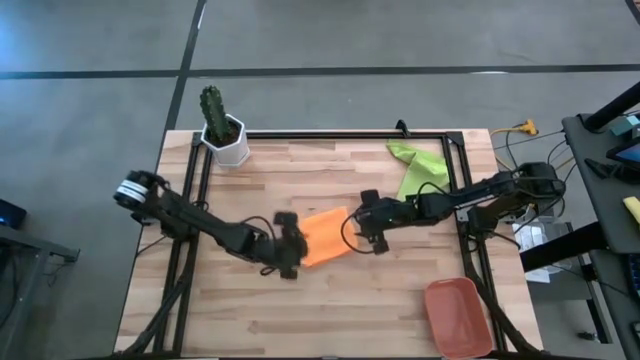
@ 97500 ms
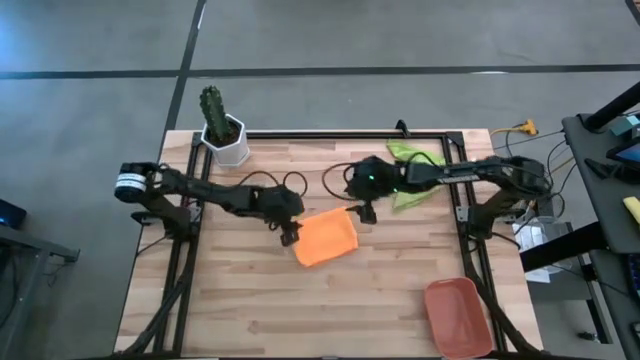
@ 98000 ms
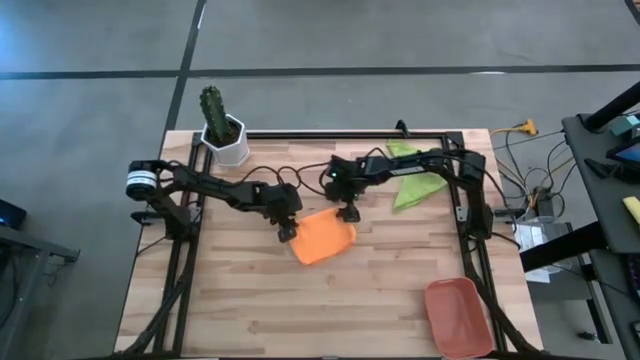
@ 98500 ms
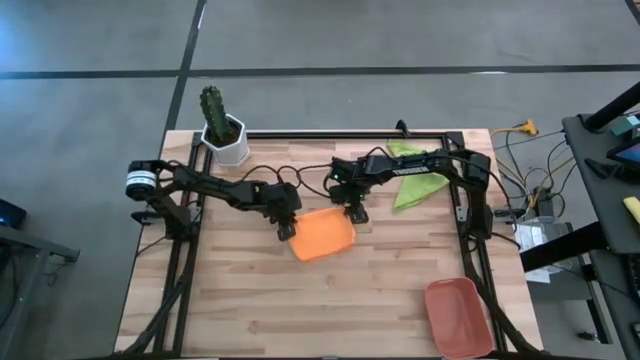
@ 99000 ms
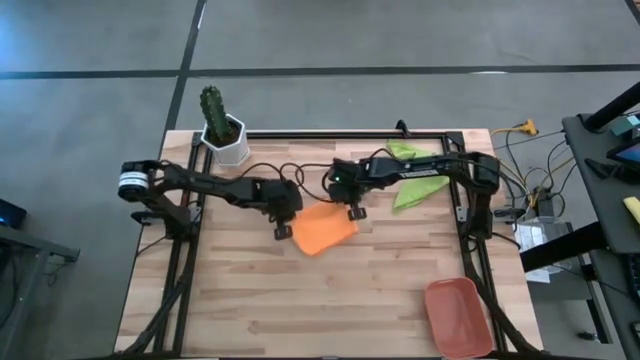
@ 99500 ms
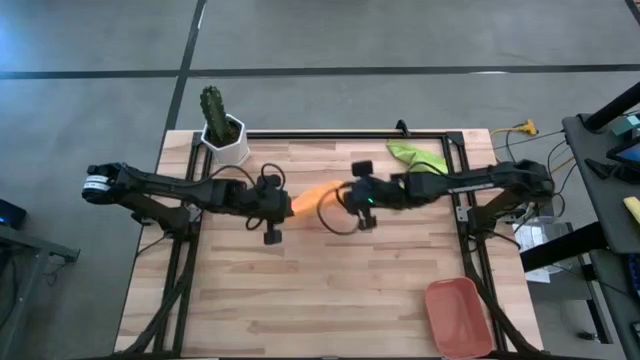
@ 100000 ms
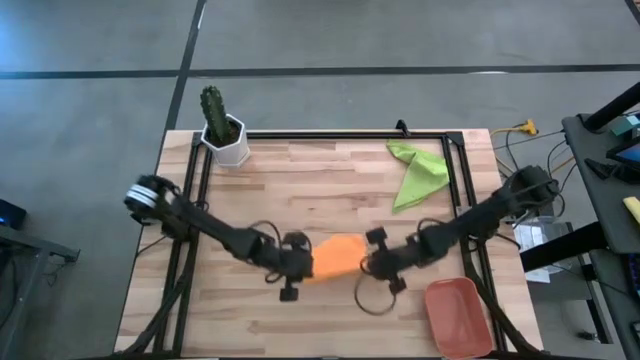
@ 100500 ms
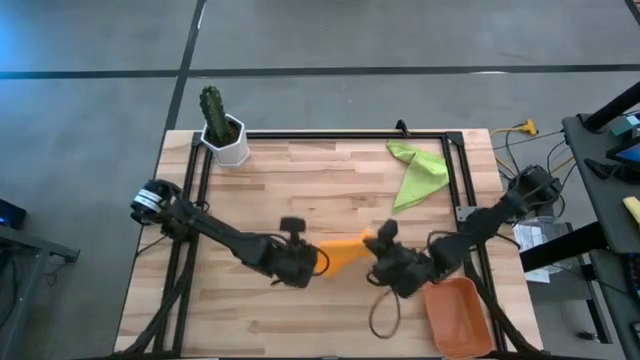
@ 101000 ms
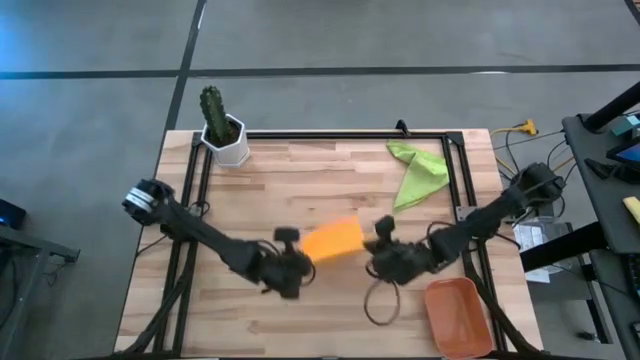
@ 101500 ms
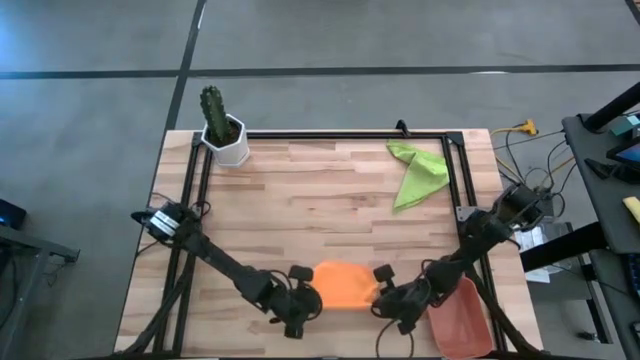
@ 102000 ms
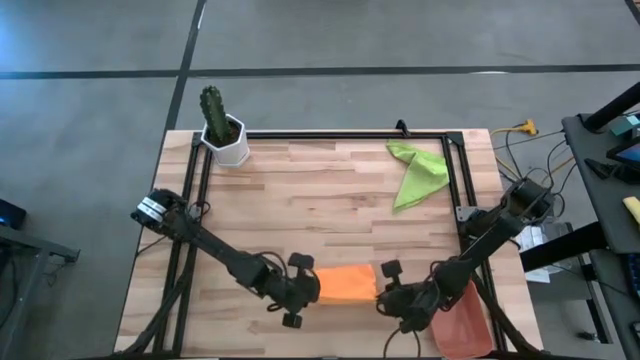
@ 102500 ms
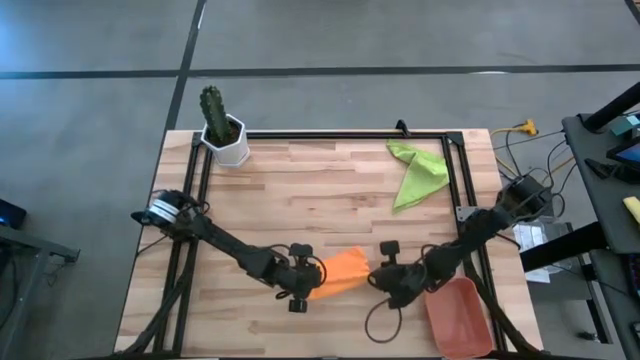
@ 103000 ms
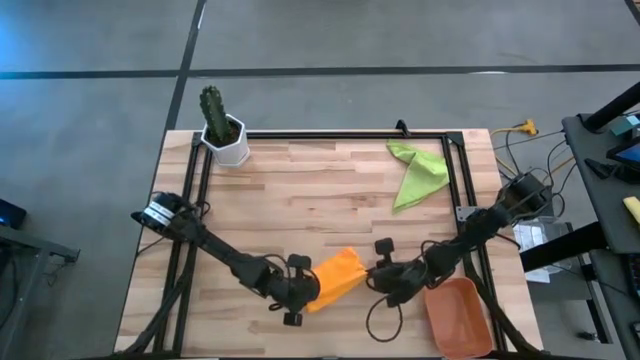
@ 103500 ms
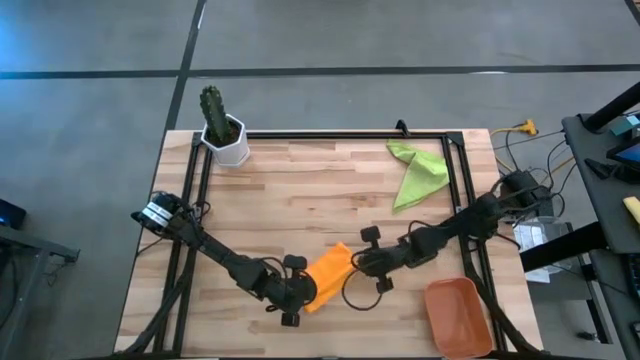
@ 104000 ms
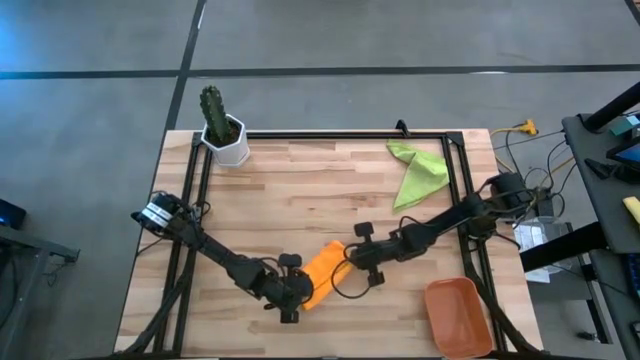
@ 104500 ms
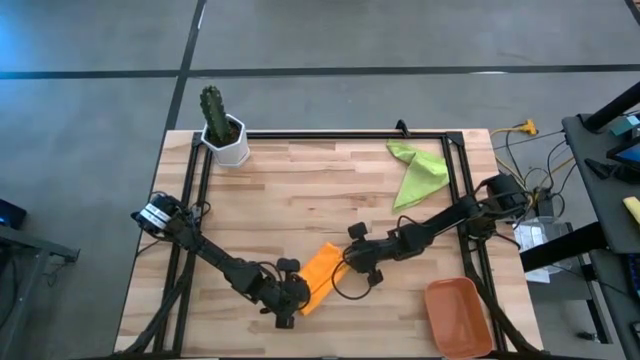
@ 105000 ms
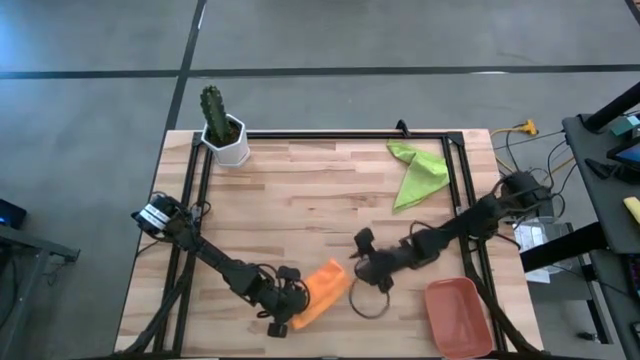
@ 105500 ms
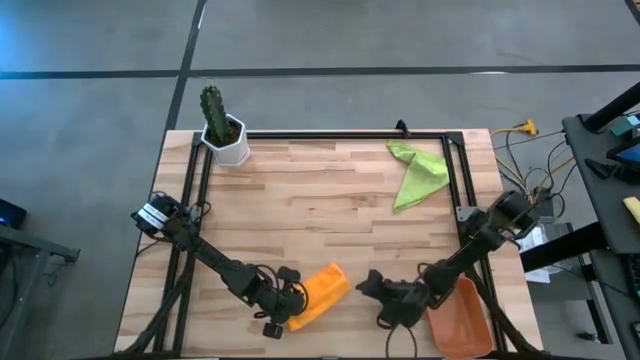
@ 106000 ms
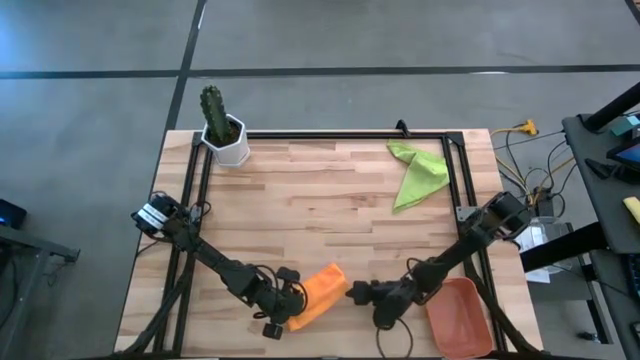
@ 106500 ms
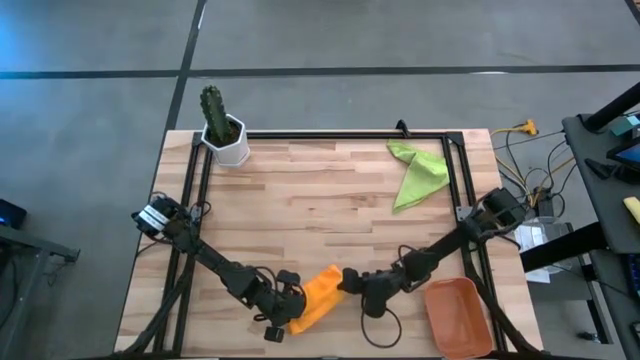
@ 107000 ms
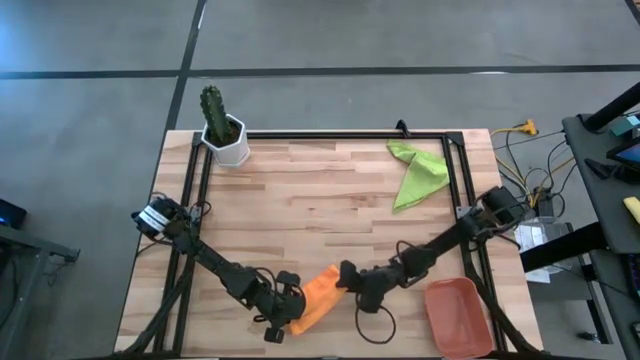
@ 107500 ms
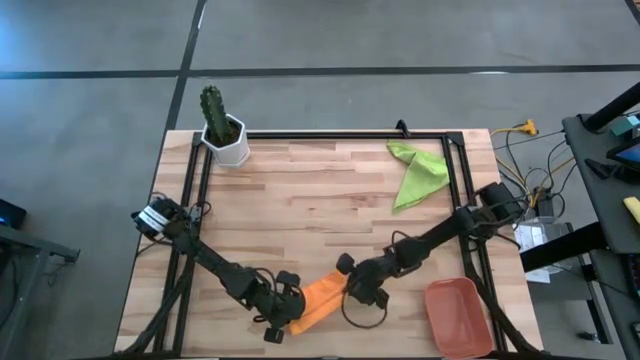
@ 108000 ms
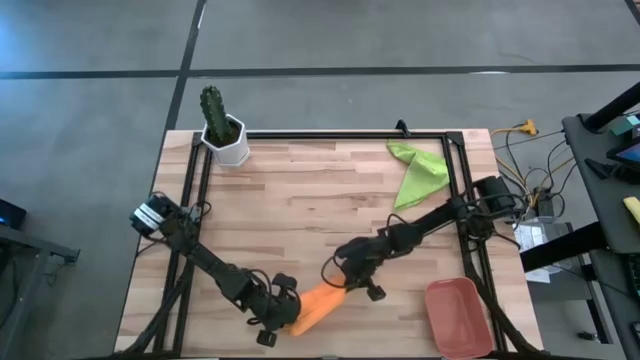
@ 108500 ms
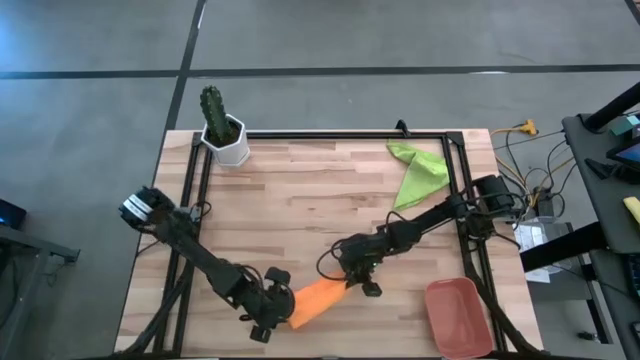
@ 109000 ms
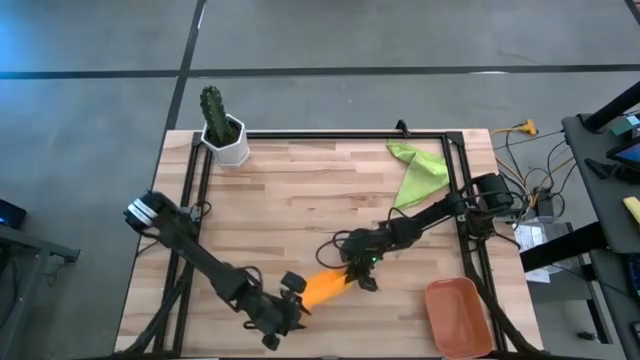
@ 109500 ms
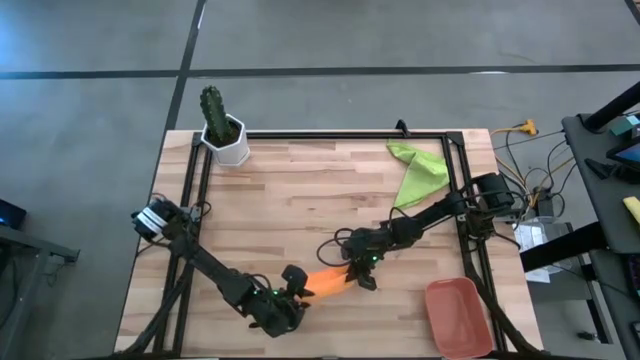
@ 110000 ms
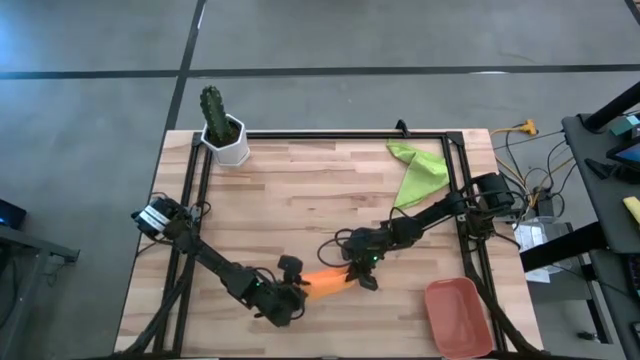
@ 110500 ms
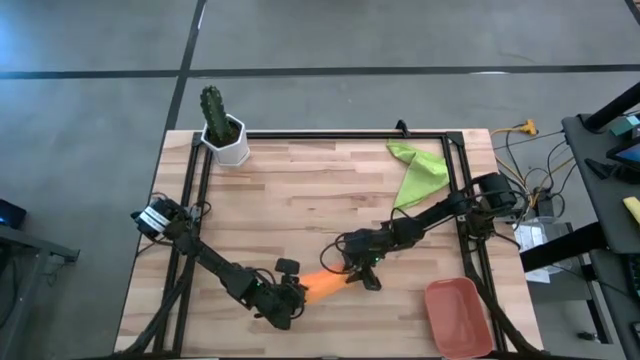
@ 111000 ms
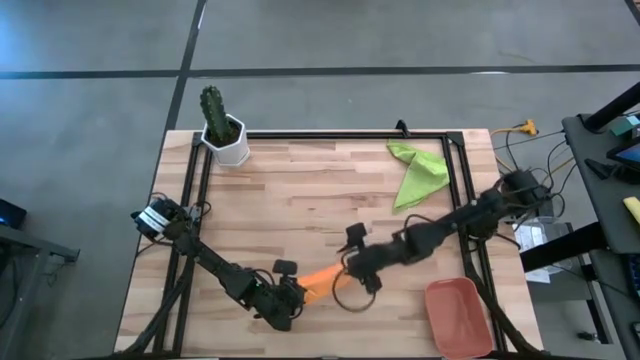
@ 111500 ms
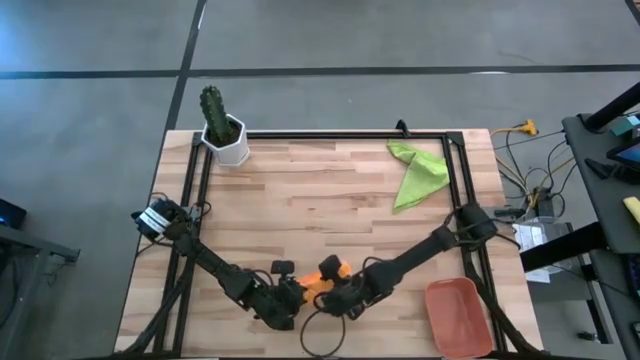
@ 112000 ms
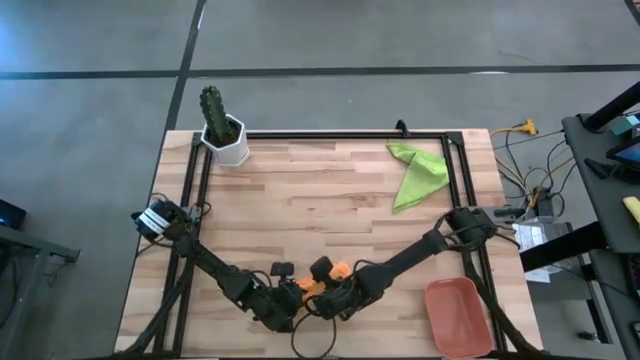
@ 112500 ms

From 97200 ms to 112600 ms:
Task: Roll microfiber towels into tight, uniform cylinder then place into a basket
Roll the orange microfiber cloth

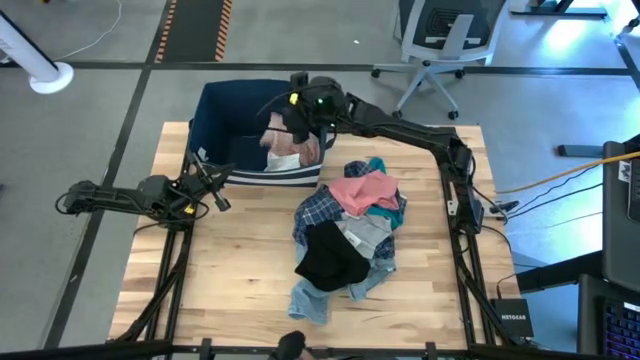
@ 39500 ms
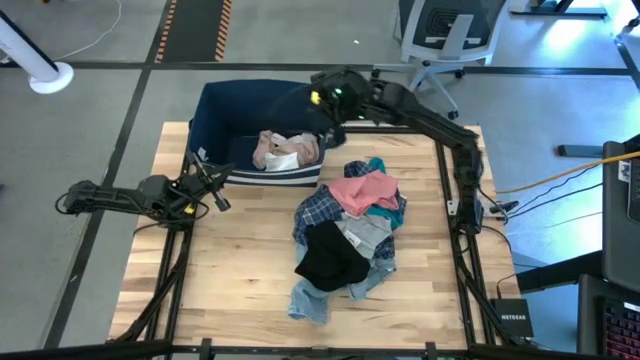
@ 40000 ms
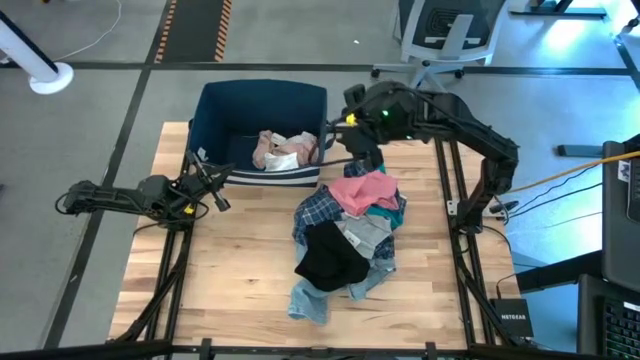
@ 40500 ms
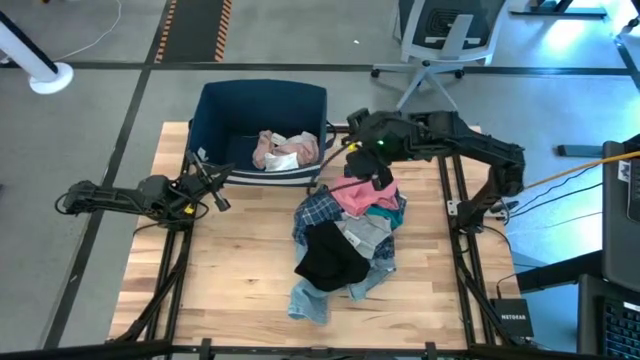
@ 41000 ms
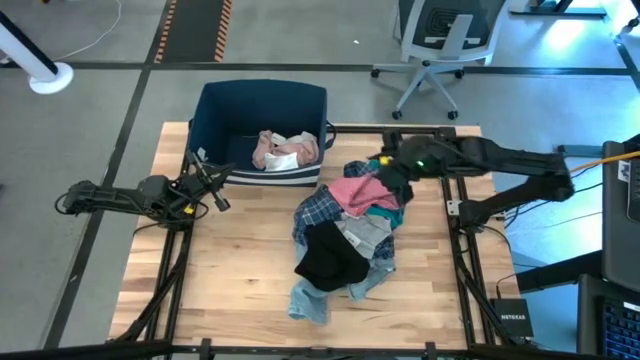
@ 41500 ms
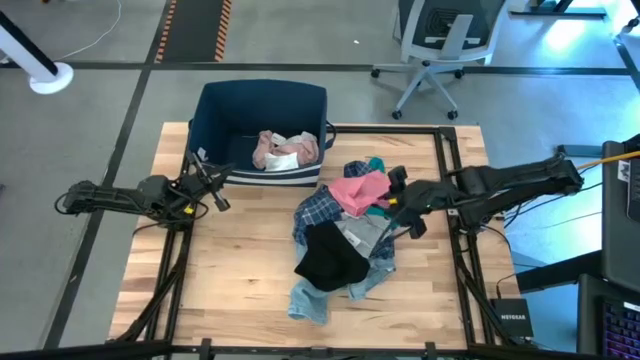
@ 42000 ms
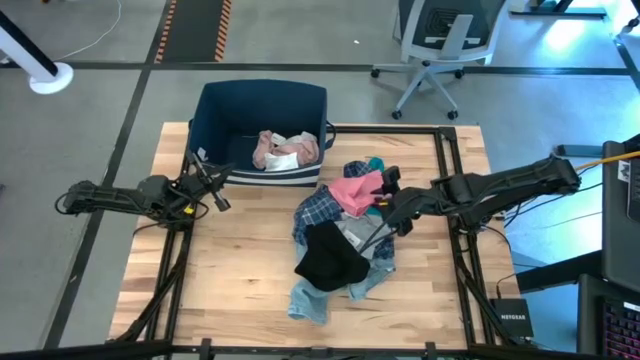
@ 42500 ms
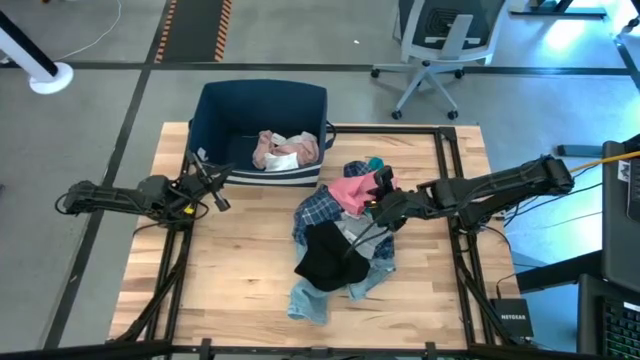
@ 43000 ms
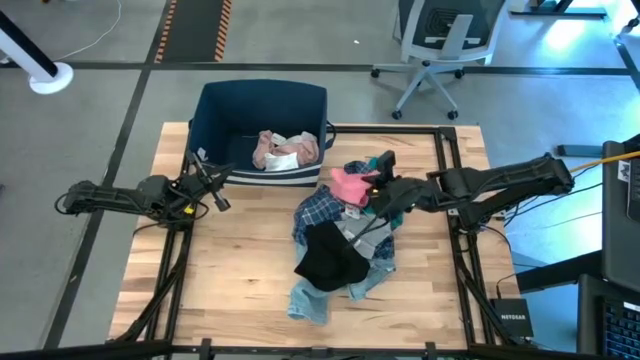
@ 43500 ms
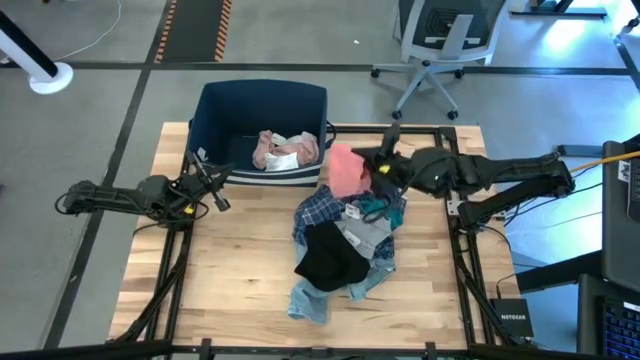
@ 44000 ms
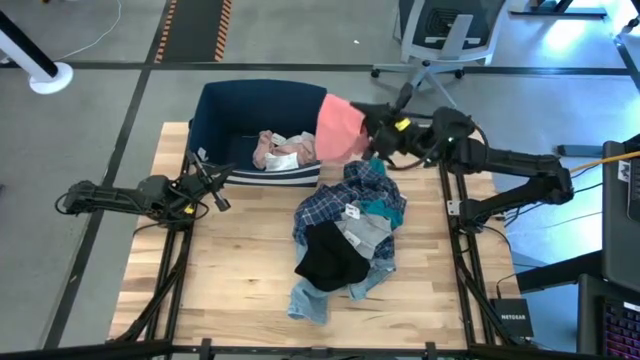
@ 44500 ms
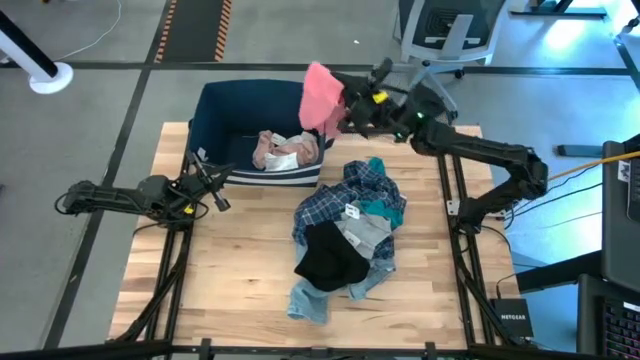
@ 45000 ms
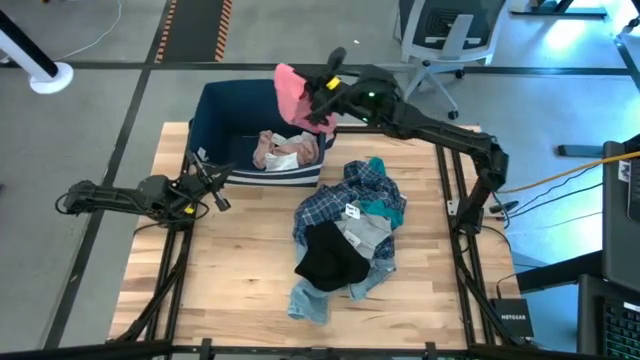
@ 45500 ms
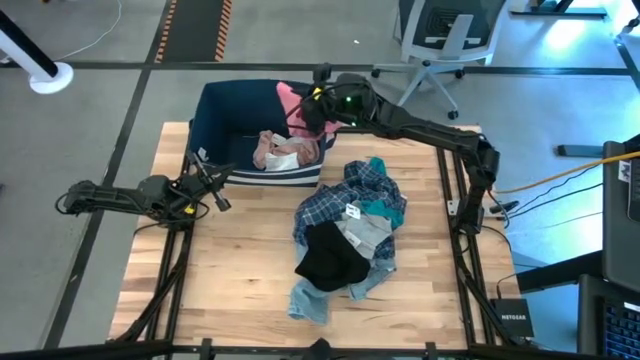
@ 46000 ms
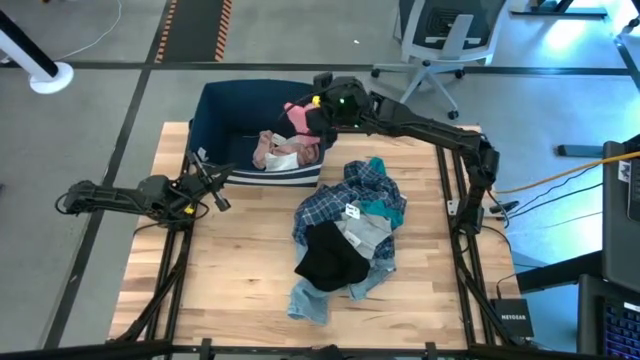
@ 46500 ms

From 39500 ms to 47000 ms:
Task: Sort clothes
Put the pink underwear into the blue laundry bin
